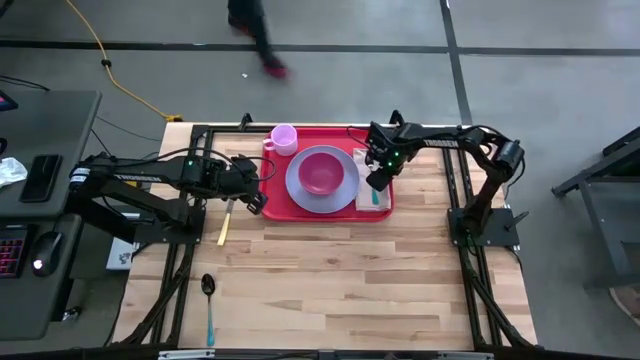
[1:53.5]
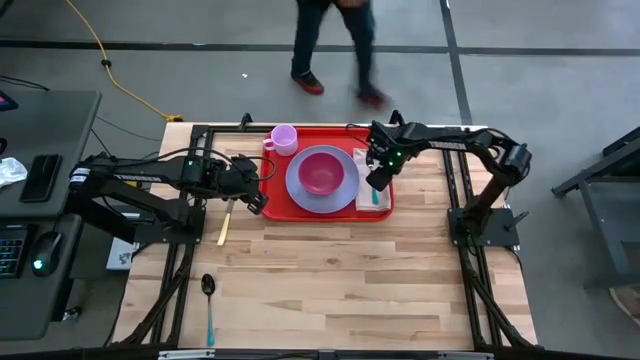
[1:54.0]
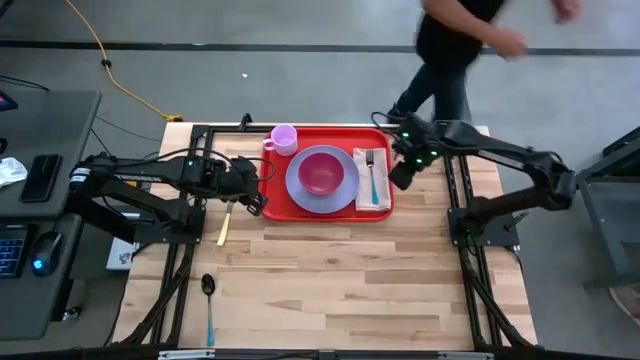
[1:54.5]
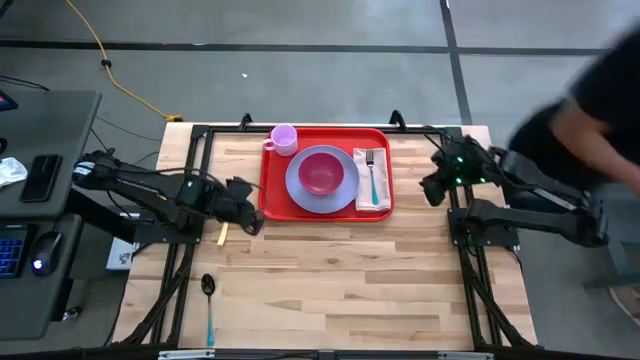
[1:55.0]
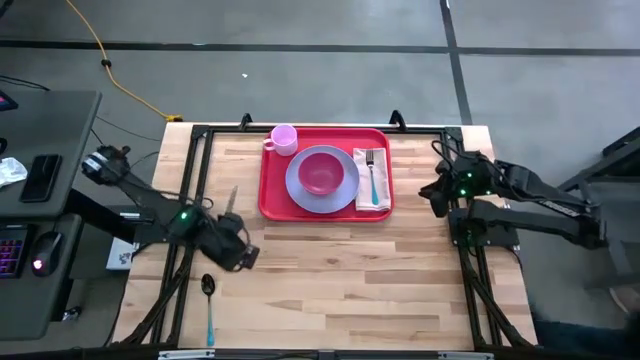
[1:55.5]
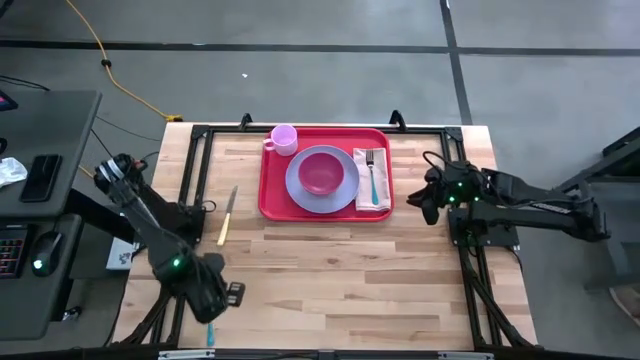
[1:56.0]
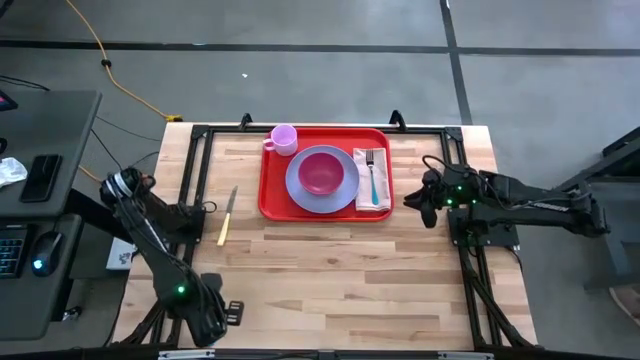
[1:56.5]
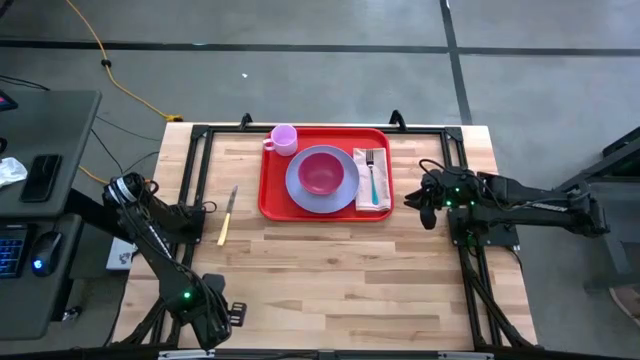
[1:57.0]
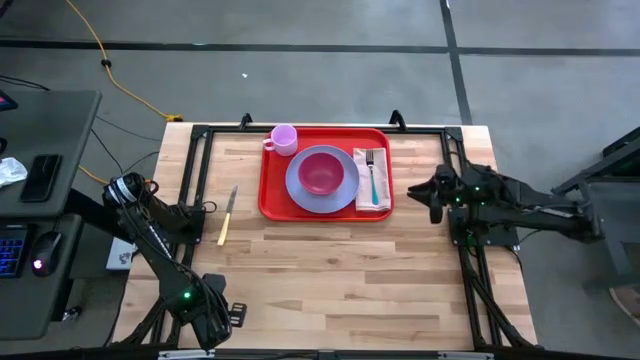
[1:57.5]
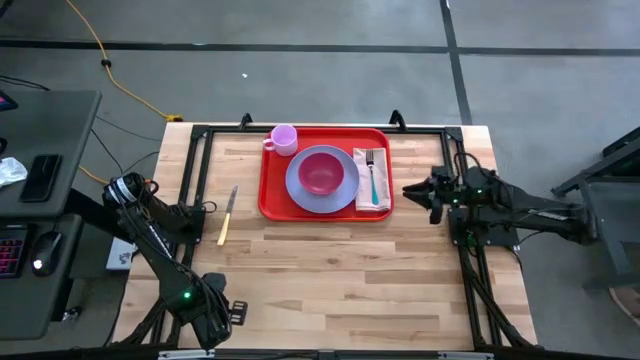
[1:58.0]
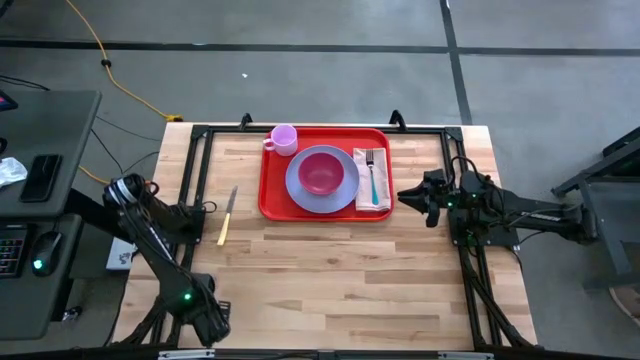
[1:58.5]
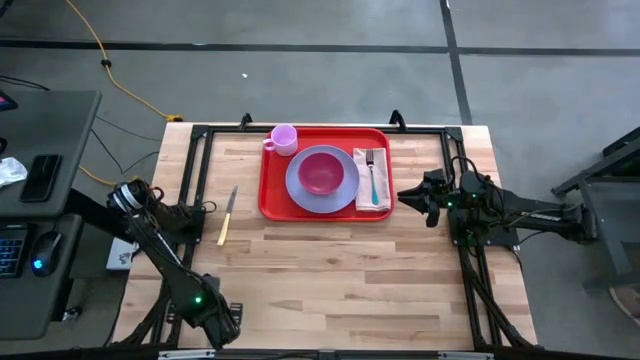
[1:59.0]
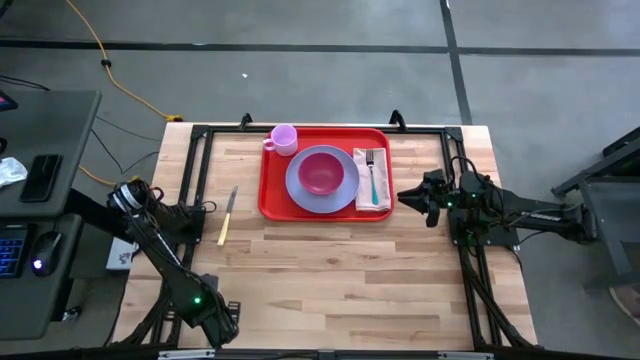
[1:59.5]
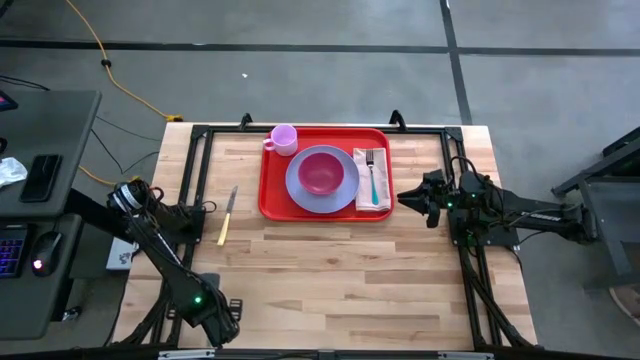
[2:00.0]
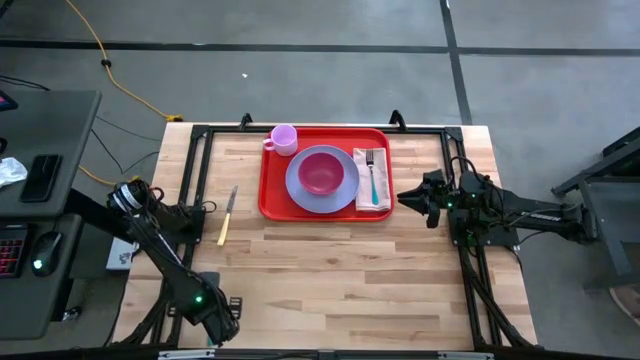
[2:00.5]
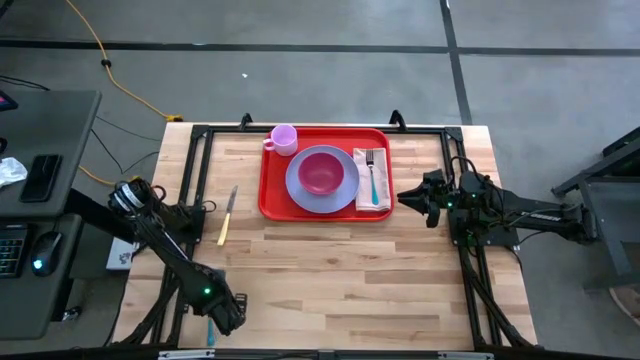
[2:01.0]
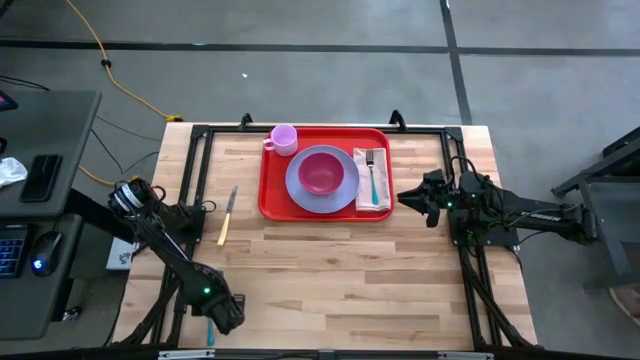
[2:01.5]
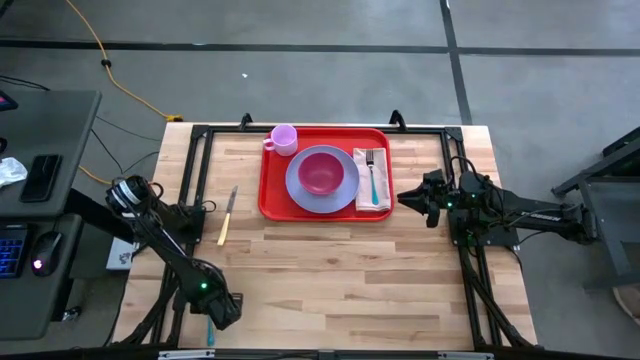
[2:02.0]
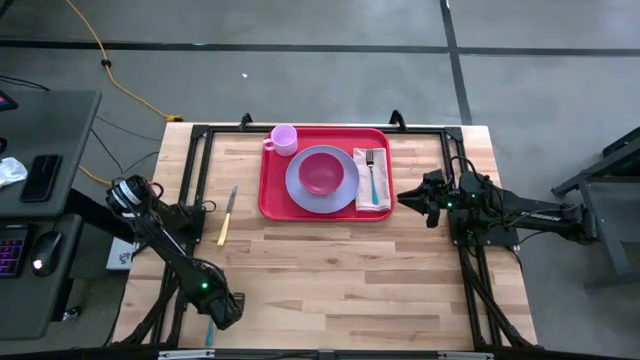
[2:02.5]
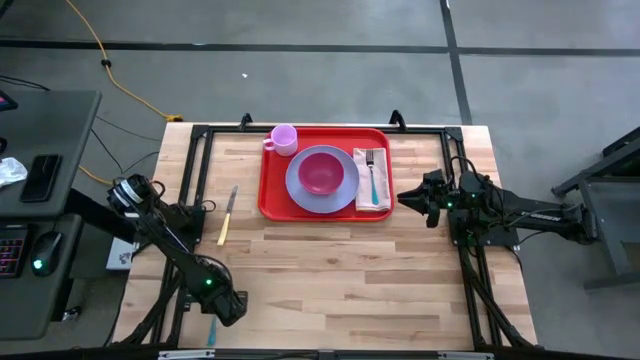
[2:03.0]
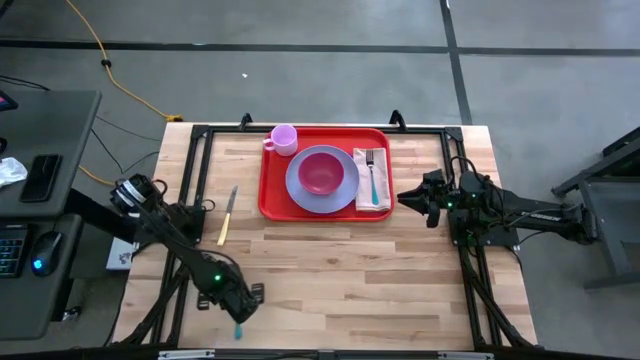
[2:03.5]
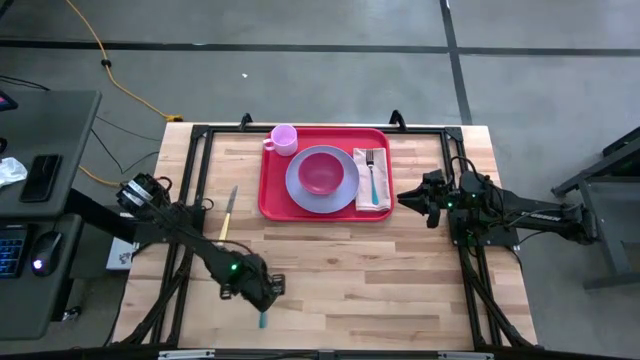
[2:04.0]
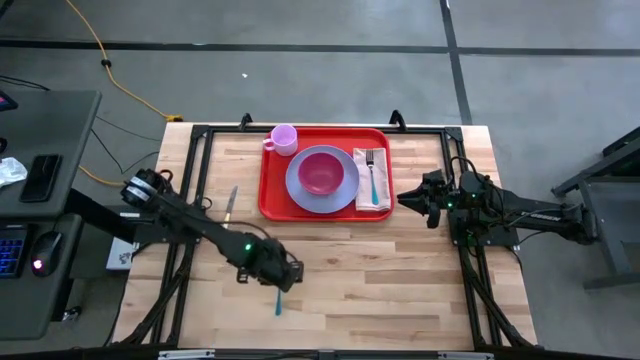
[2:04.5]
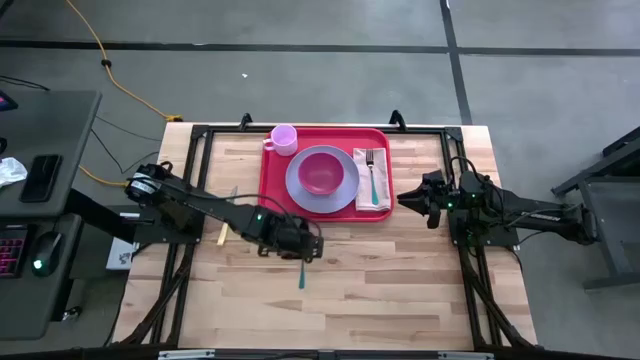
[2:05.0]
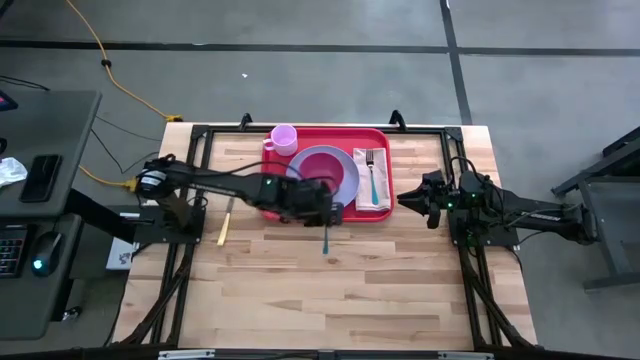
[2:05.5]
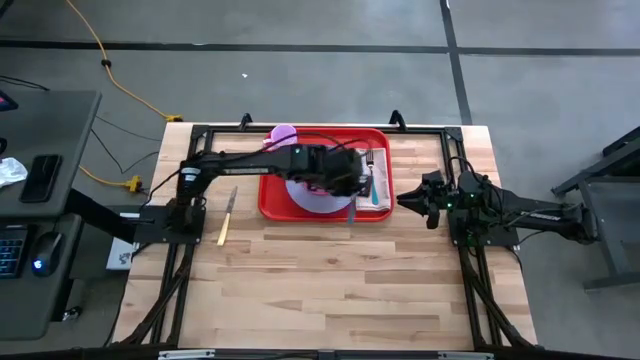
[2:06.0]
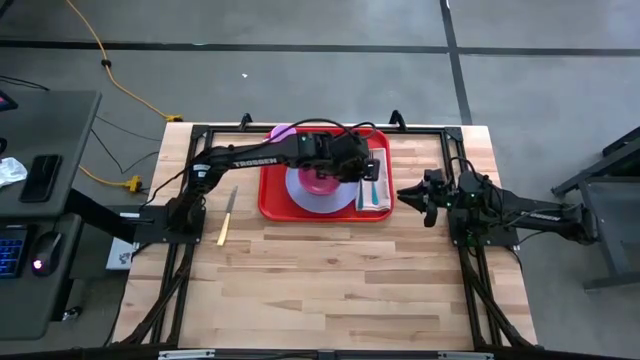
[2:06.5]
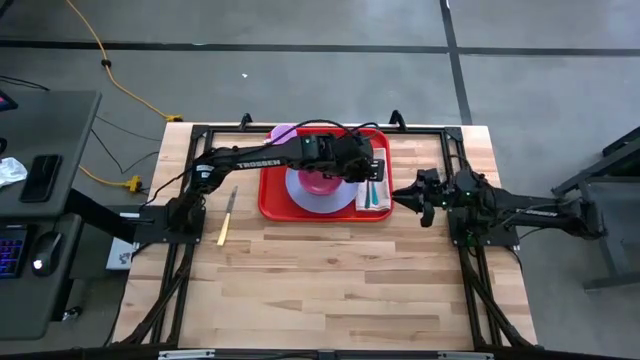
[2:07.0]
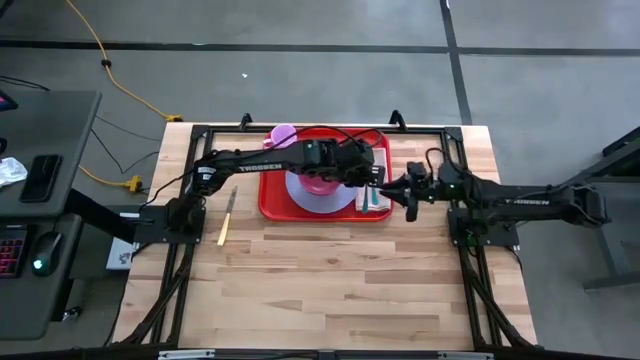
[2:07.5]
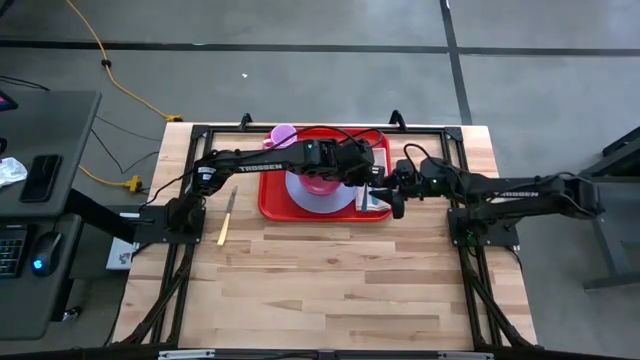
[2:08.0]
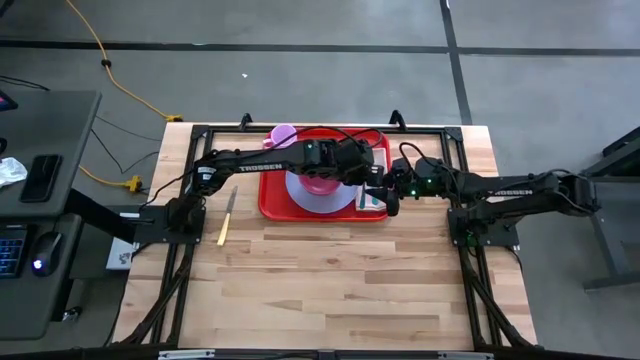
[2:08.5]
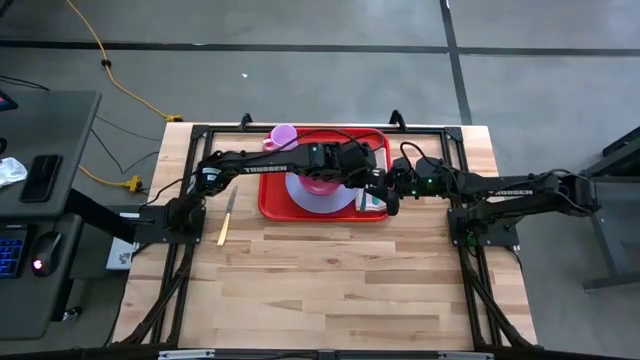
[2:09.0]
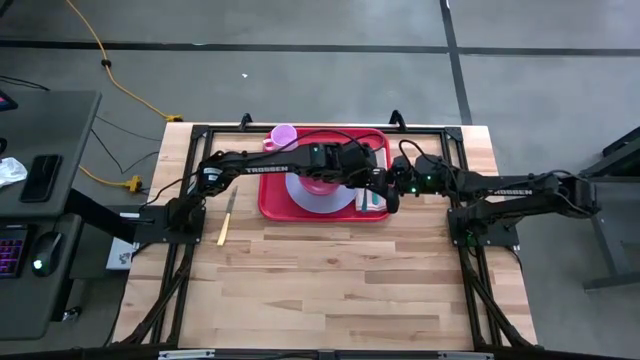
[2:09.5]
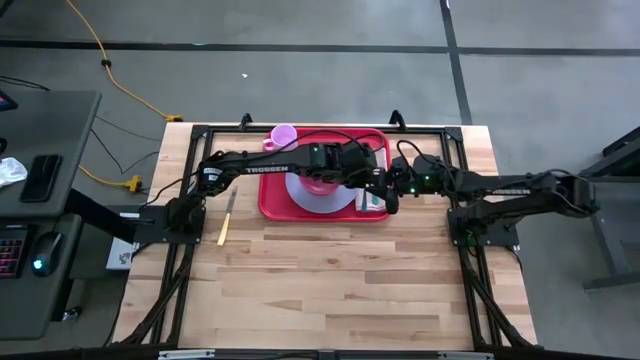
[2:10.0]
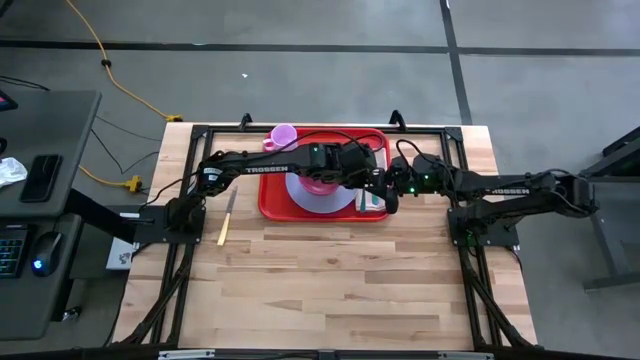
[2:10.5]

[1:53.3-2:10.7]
Task: Set up tray
Put the blue spoon to the left of the blue fork on the brown napkin on the orange serving tray

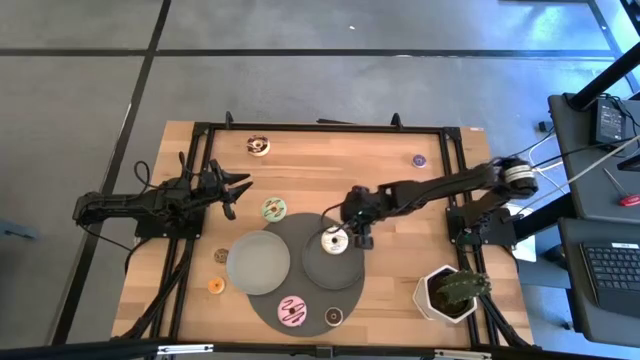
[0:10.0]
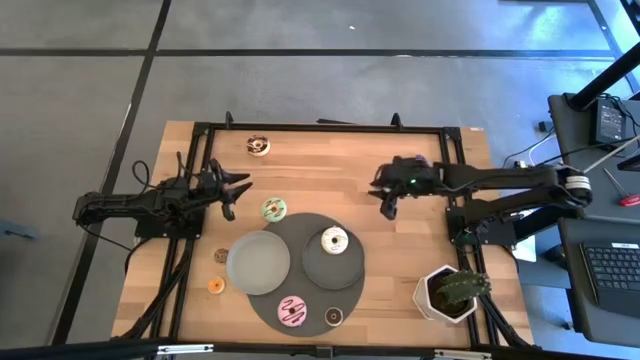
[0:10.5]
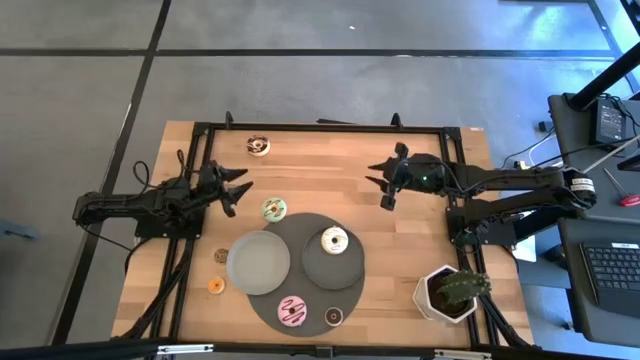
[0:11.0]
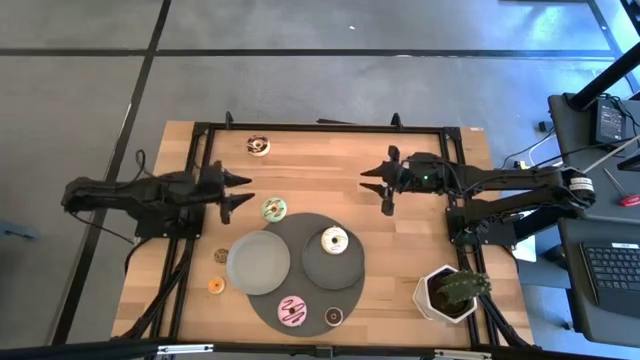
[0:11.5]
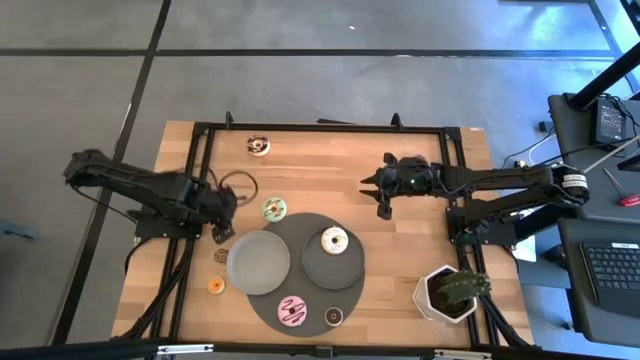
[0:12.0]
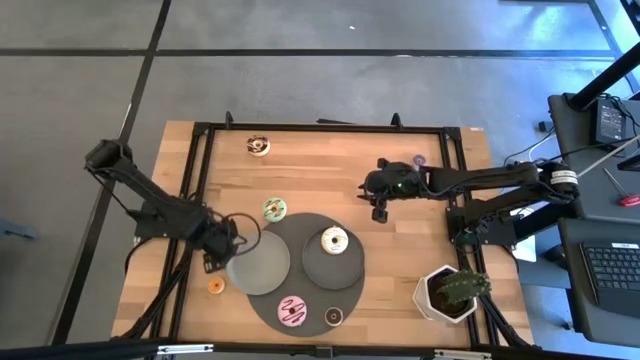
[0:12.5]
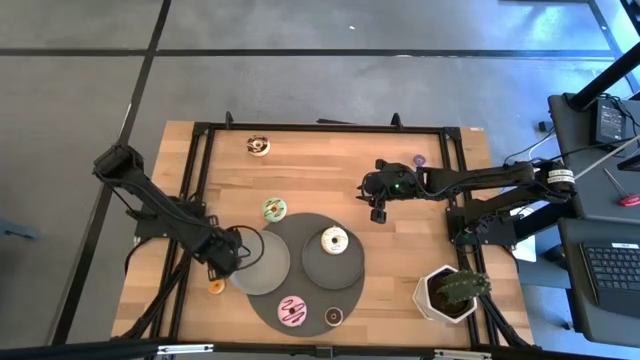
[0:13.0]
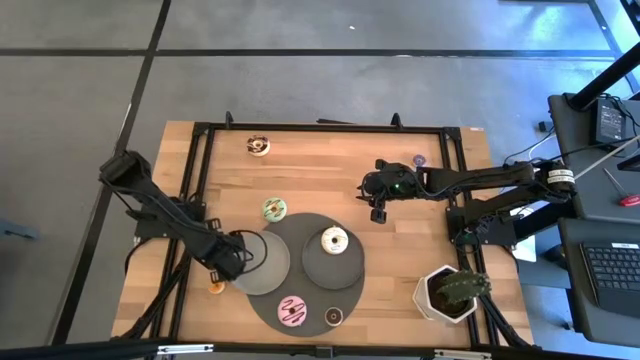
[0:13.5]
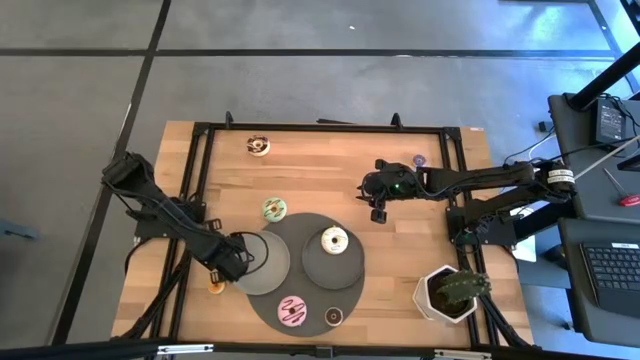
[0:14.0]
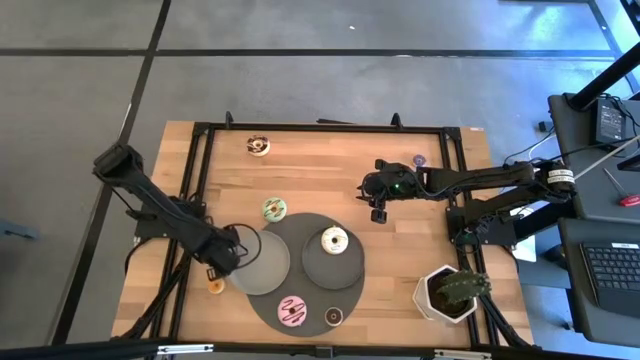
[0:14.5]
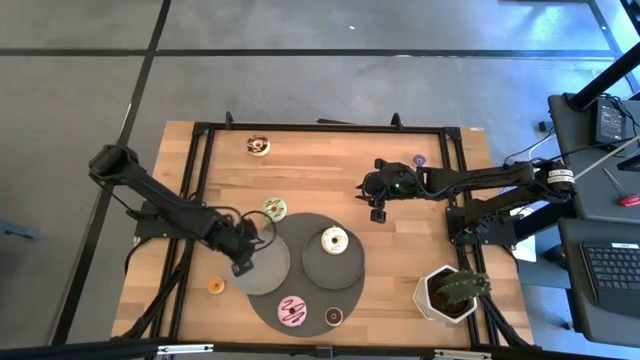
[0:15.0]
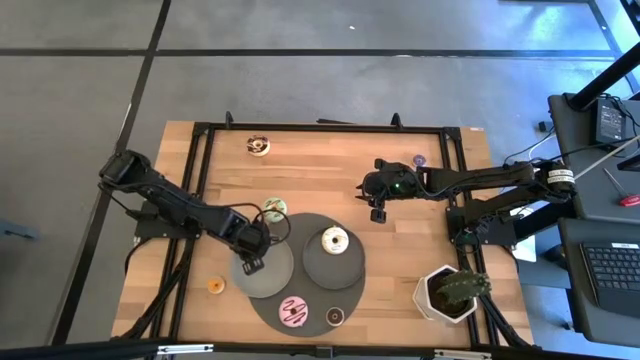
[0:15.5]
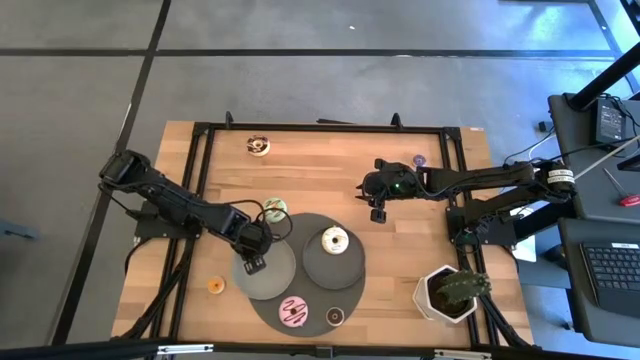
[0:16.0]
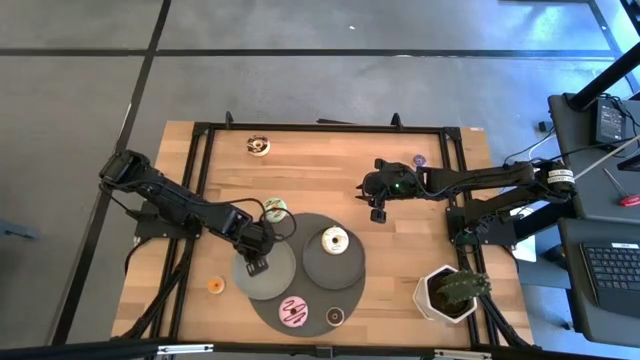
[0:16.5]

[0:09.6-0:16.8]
Task: Pick & Place donuts
Put the small brown donut on the gray plate
